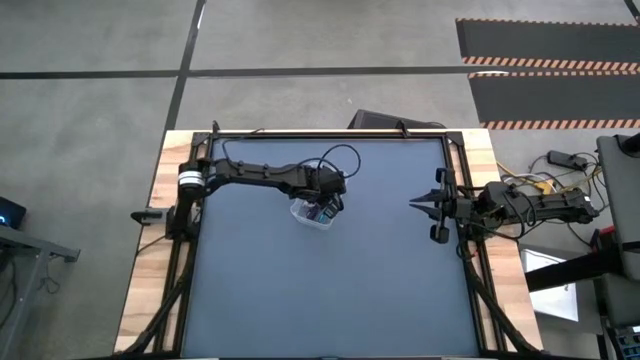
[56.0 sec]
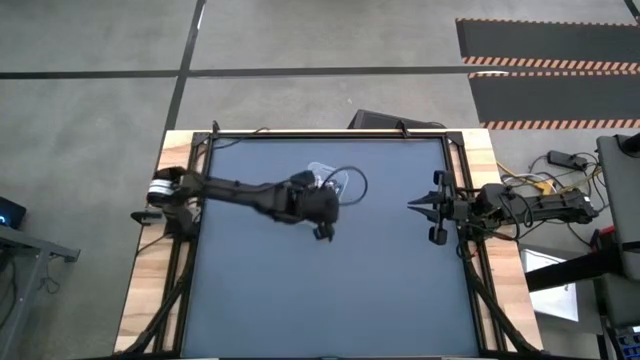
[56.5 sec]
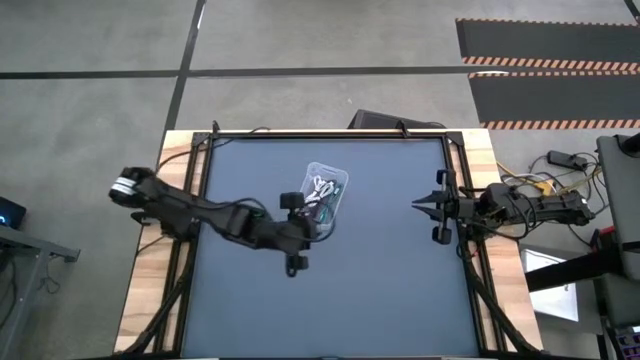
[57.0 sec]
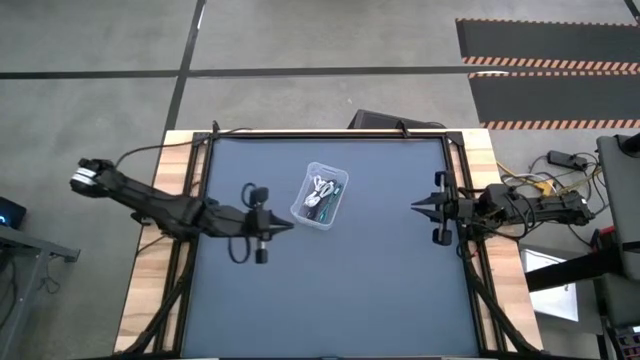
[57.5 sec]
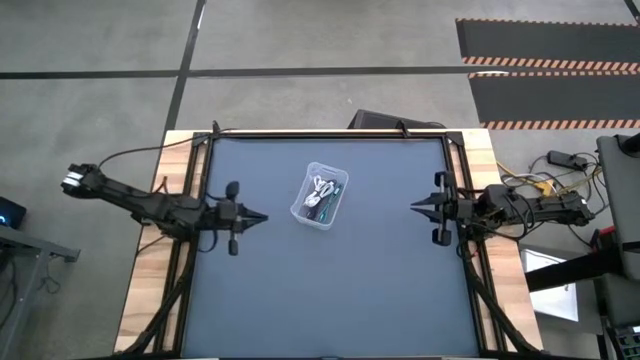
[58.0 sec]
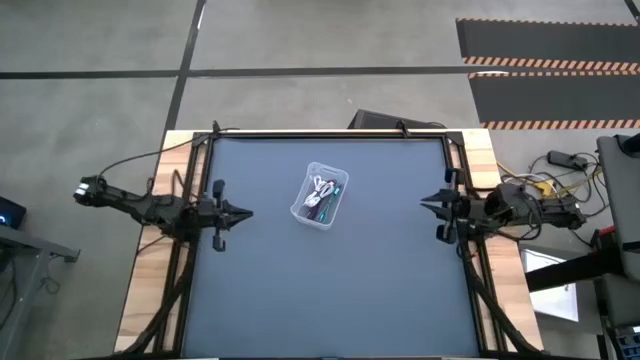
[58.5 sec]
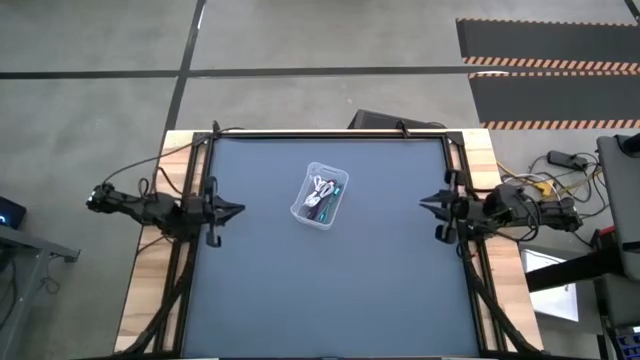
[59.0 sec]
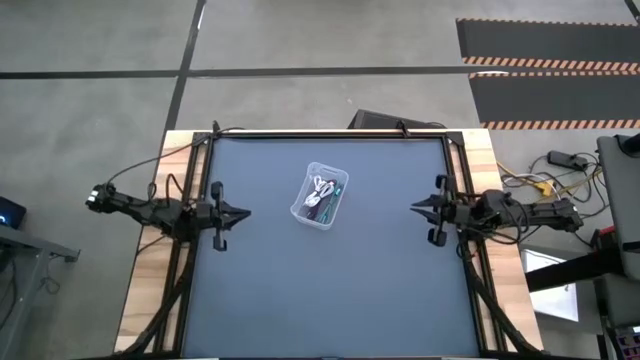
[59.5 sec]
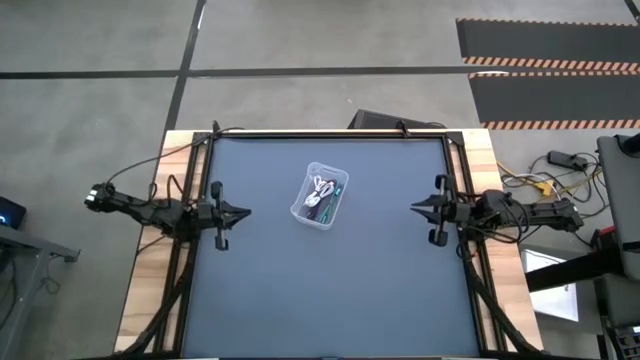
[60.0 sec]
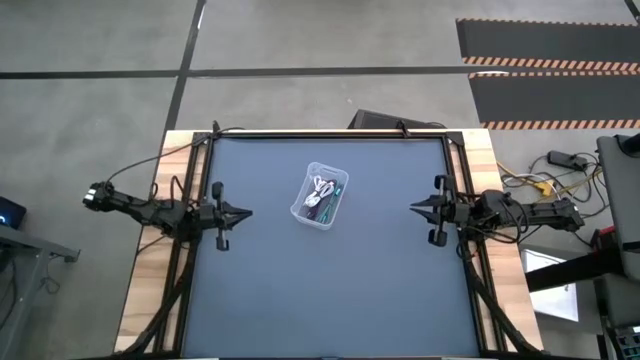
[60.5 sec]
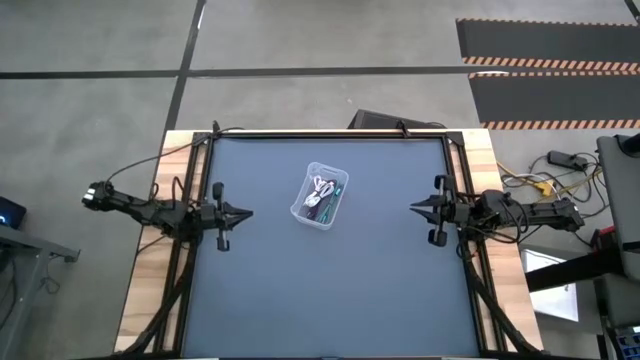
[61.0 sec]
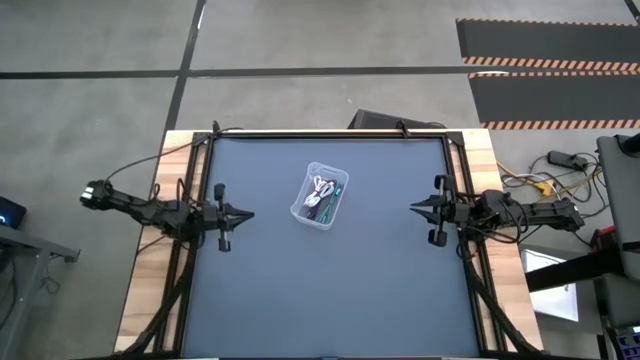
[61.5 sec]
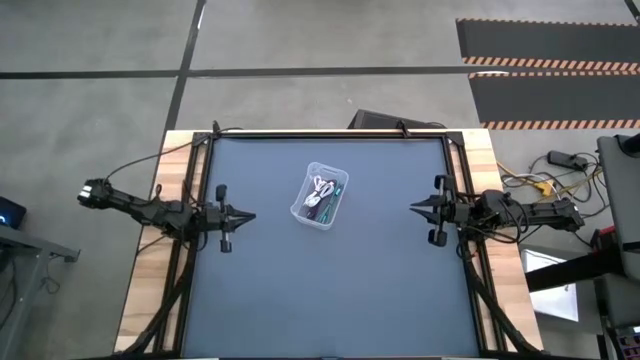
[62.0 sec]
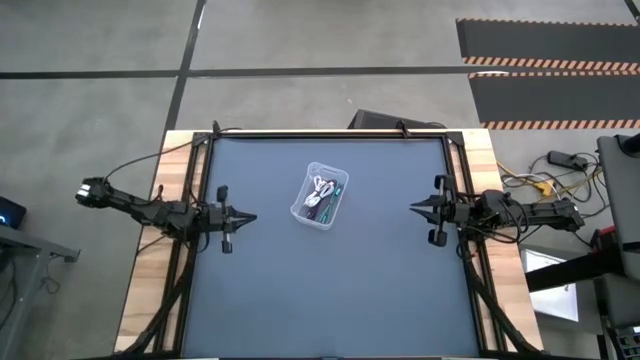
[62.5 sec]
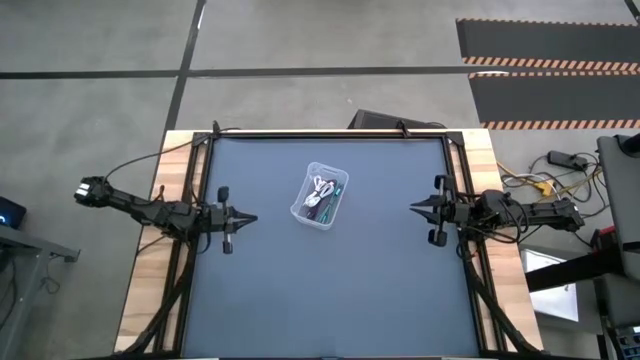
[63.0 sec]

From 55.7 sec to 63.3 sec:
Task: Pick and place USB-C Cables
Return to Home Position

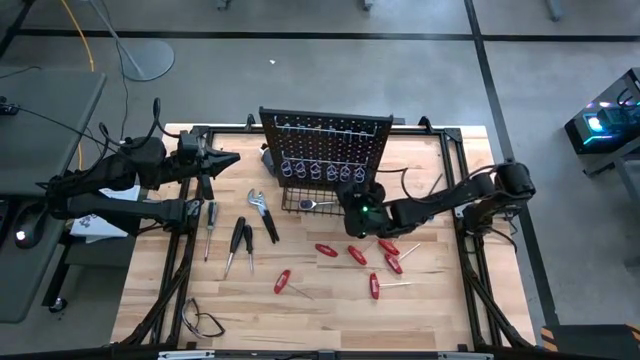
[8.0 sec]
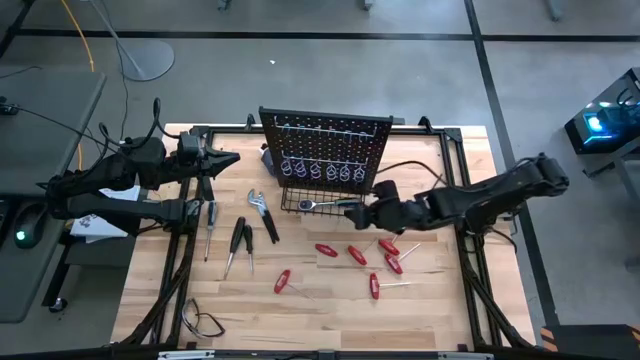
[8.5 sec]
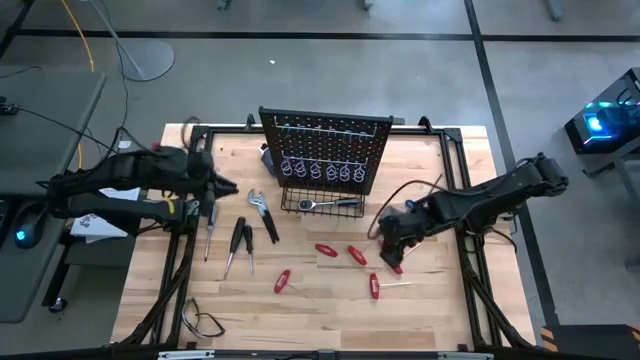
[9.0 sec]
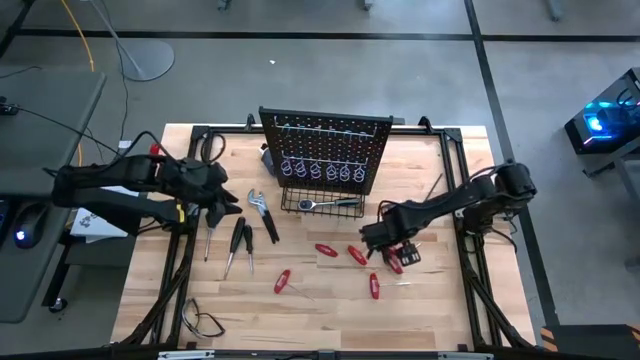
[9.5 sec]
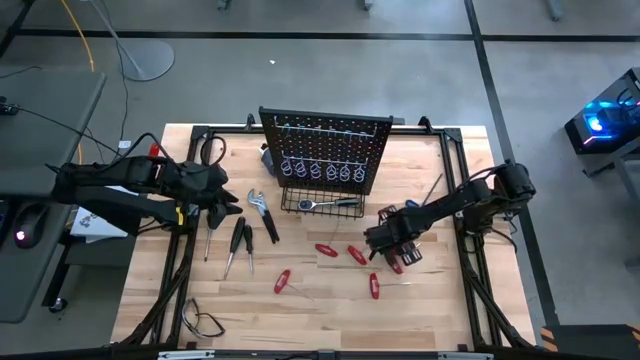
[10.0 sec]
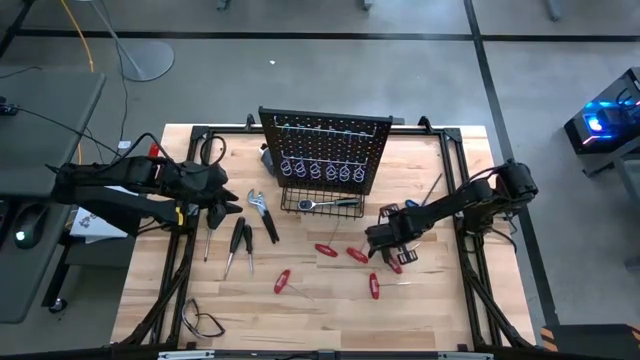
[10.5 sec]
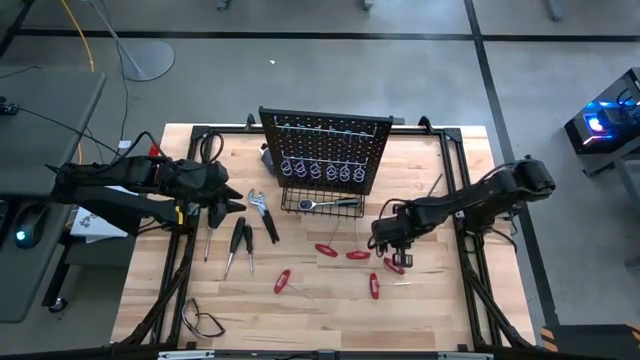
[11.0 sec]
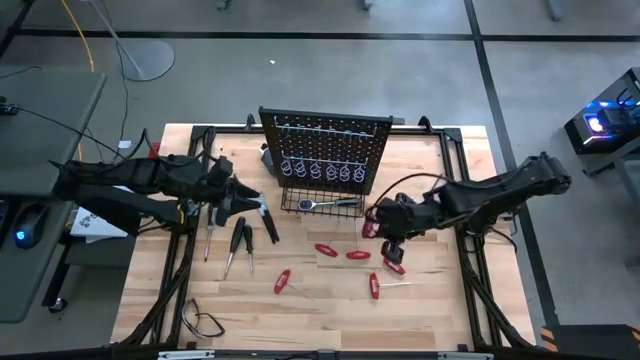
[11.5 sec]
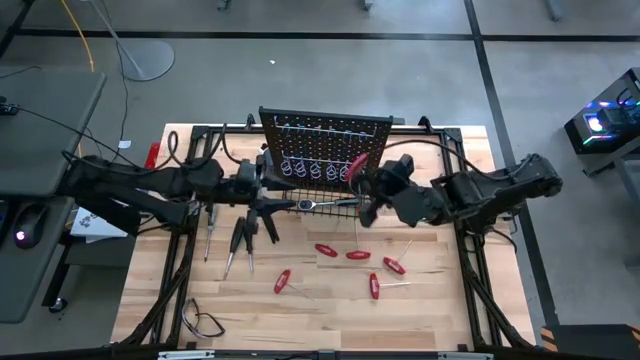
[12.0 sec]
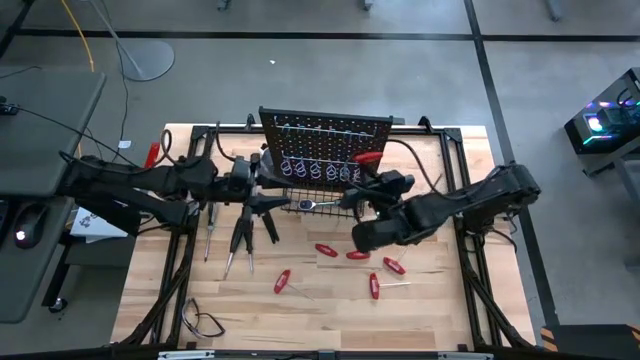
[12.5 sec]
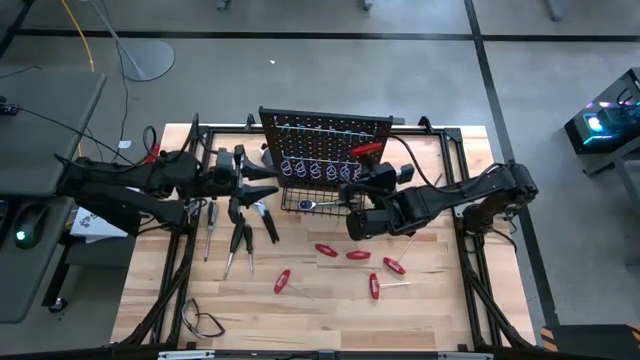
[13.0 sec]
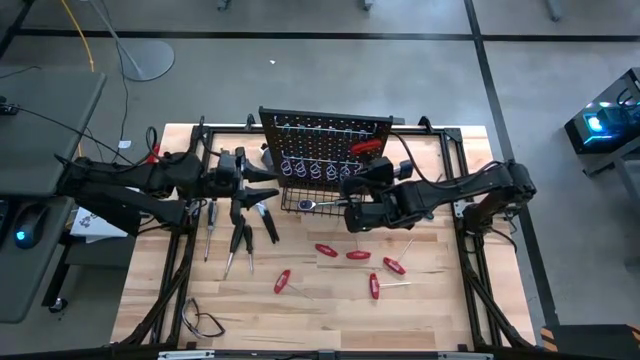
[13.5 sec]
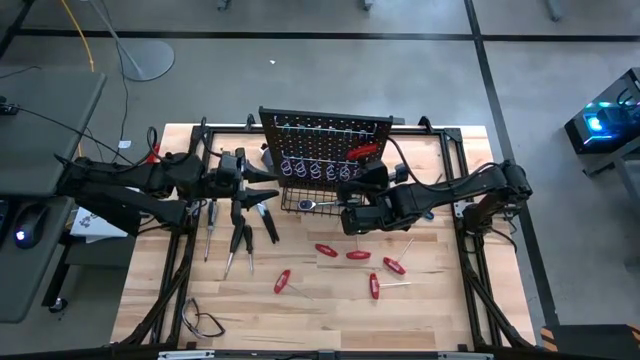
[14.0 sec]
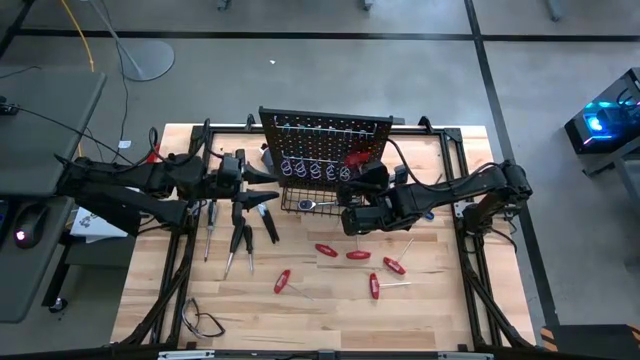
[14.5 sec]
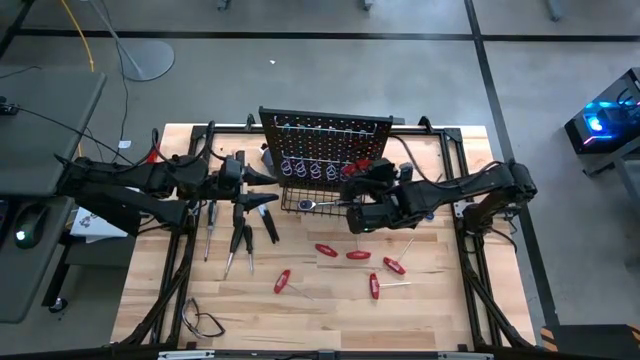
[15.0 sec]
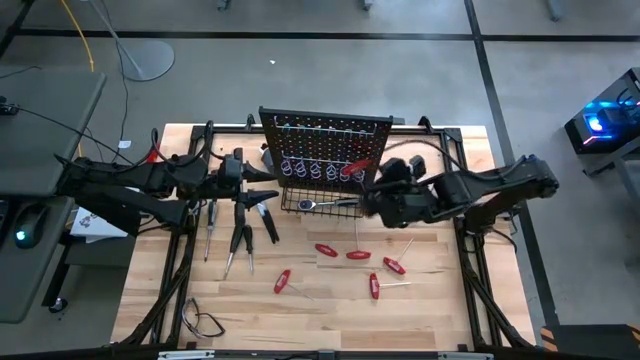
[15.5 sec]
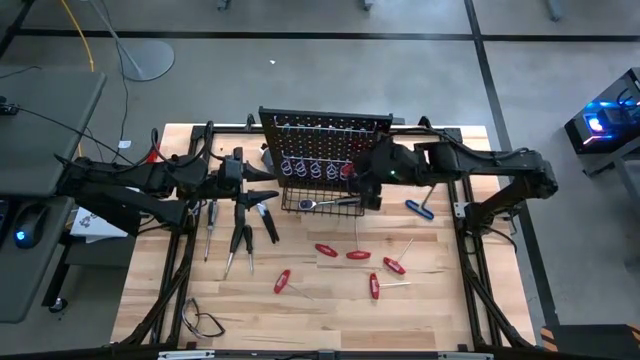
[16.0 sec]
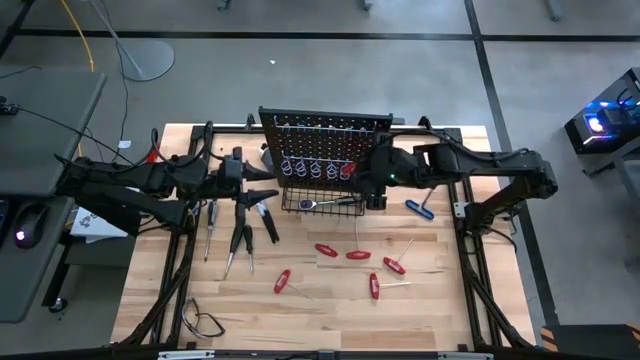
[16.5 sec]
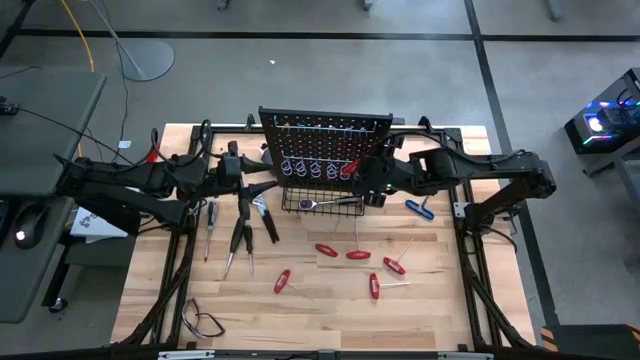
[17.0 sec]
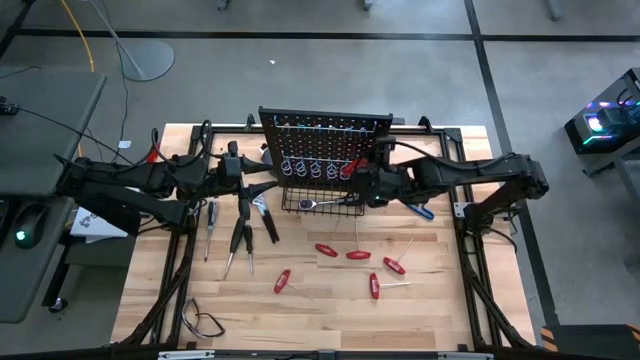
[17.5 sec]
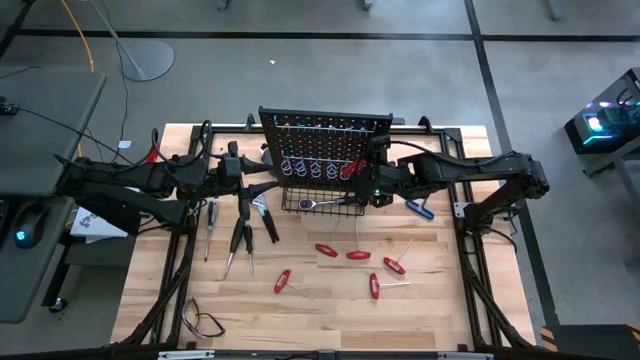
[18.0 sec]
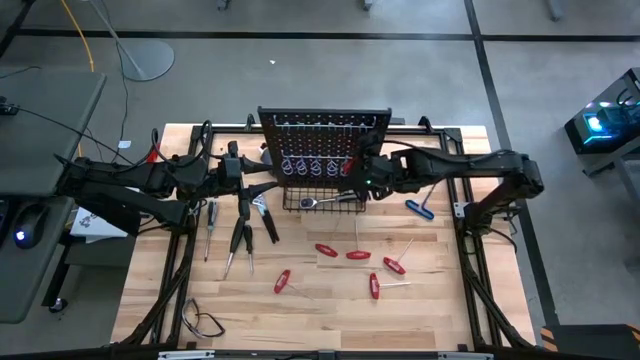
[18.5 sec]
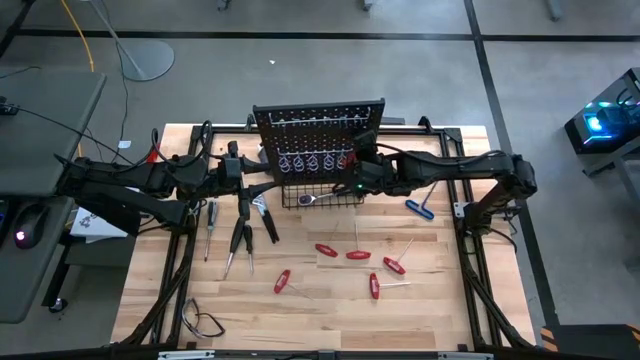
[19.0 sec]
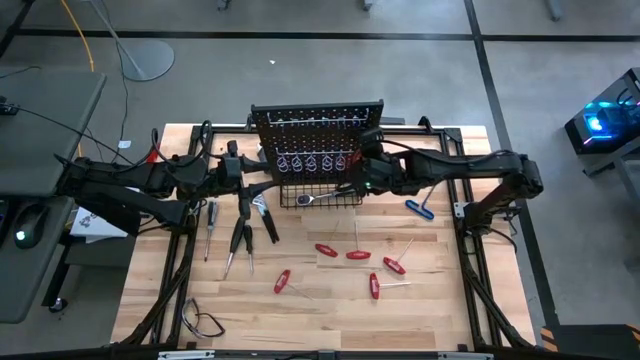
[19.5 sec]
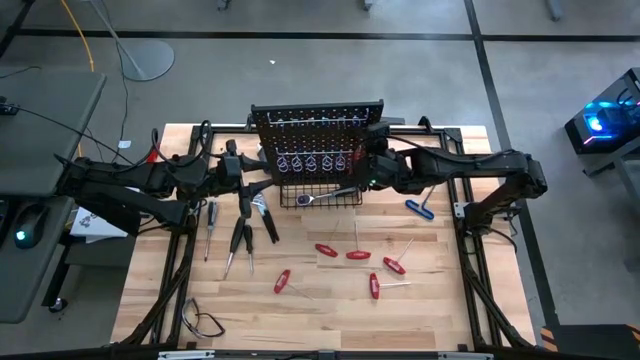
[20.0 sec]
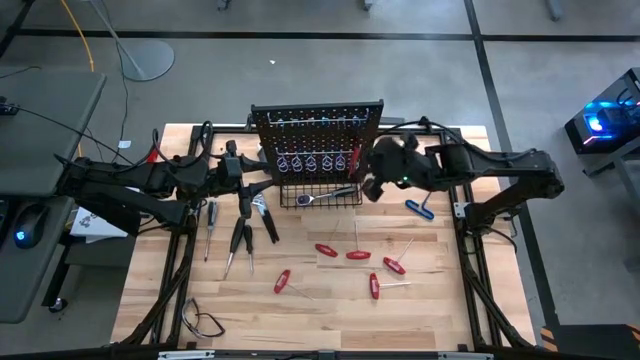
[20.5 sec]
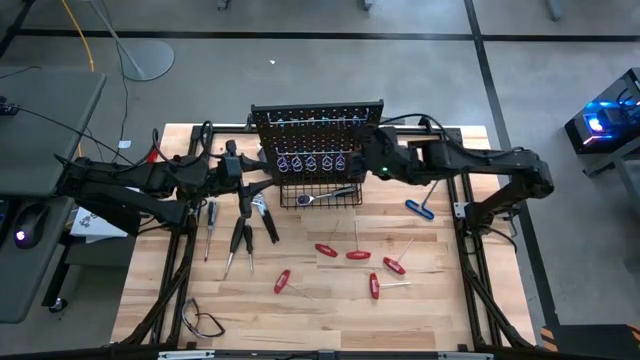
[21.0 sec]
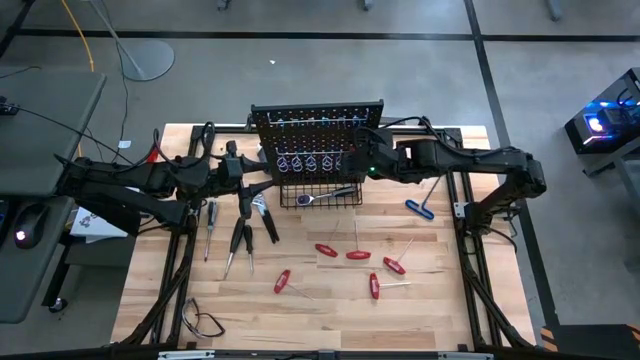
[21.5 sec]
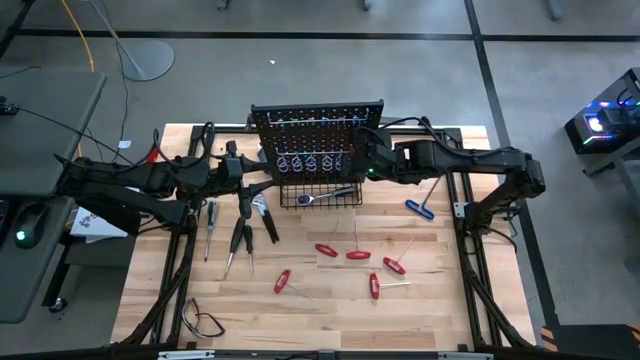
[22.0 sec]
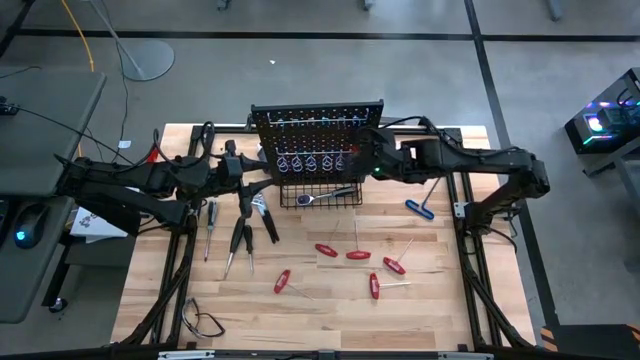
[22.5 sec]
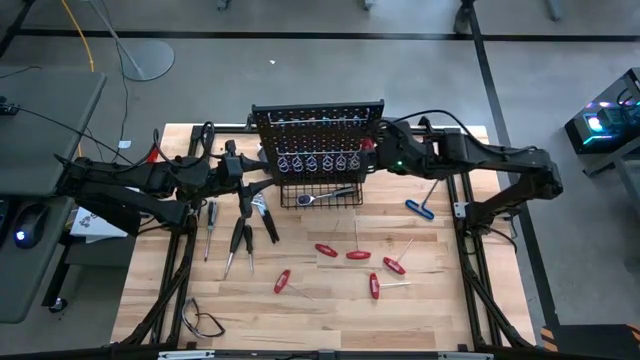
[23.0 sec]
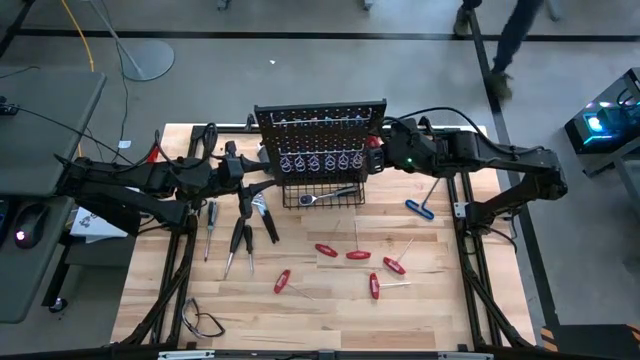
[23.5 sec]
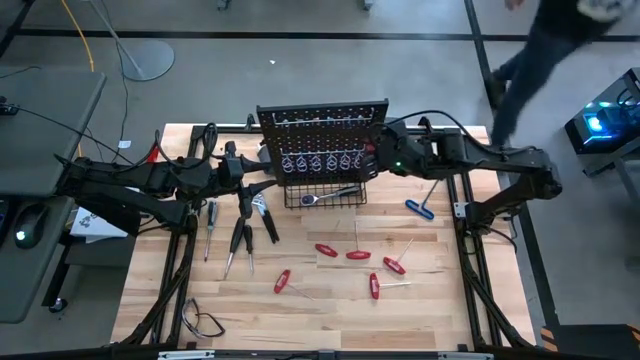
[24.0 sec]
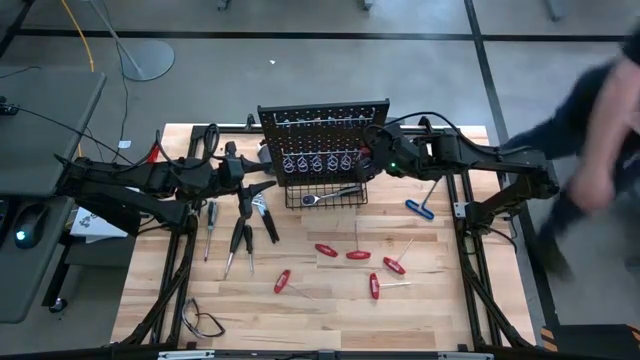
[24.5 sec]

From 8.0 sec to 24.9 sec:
Task: Hang tools onto peg board
Hang the red allen wrench on the peg board
